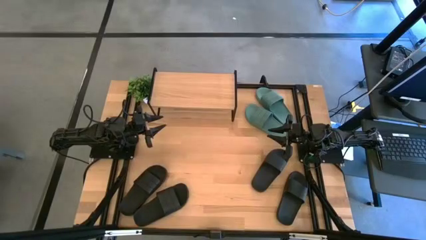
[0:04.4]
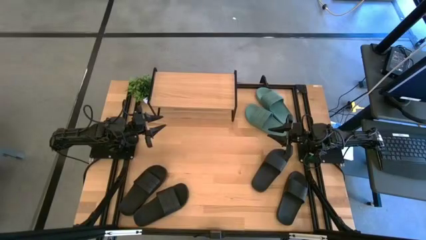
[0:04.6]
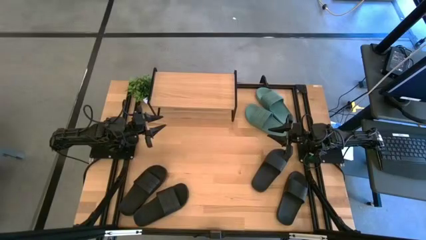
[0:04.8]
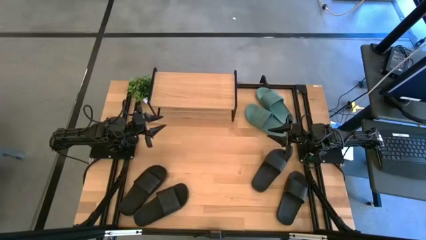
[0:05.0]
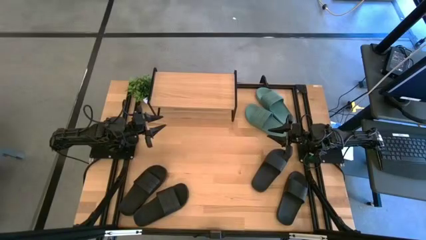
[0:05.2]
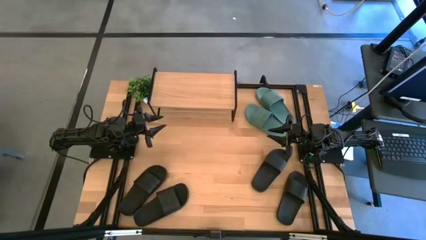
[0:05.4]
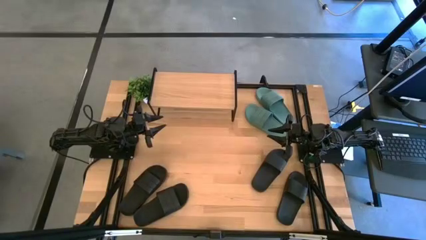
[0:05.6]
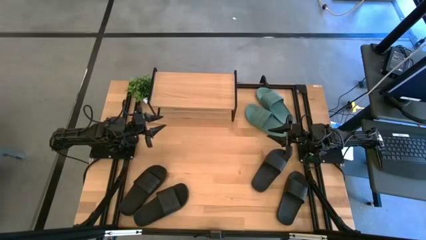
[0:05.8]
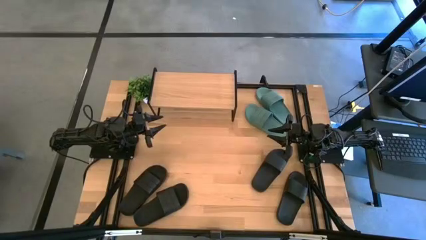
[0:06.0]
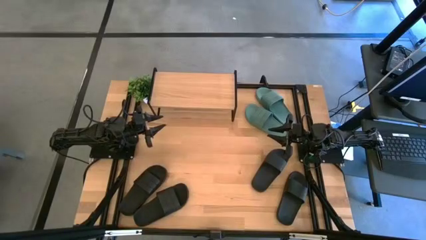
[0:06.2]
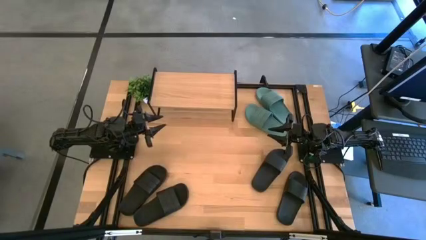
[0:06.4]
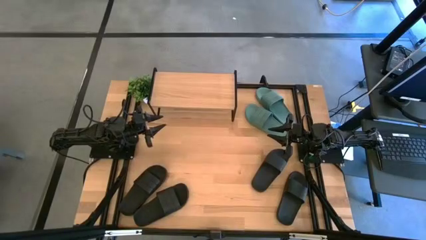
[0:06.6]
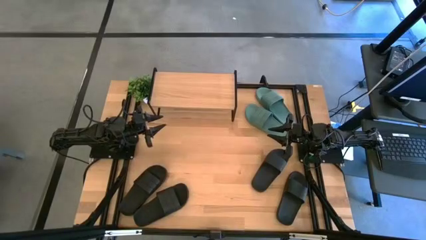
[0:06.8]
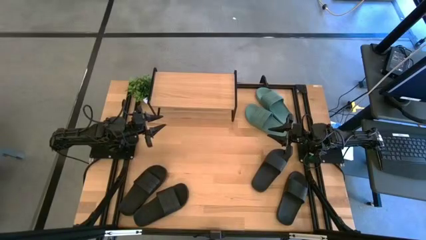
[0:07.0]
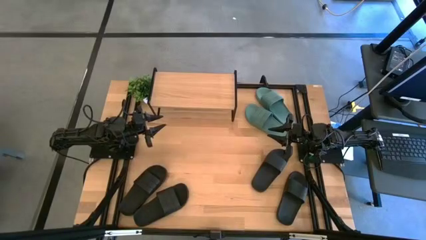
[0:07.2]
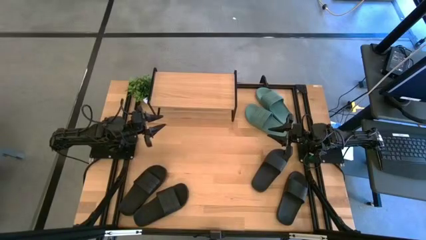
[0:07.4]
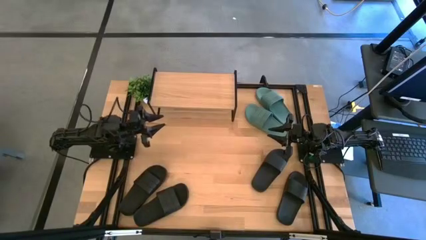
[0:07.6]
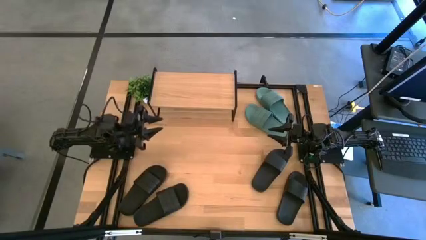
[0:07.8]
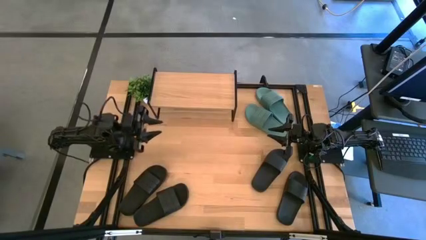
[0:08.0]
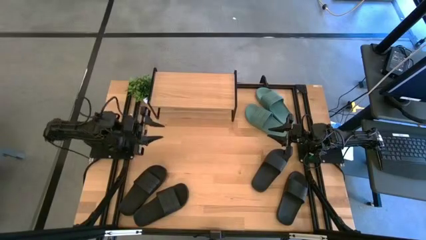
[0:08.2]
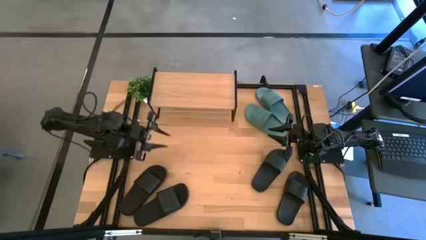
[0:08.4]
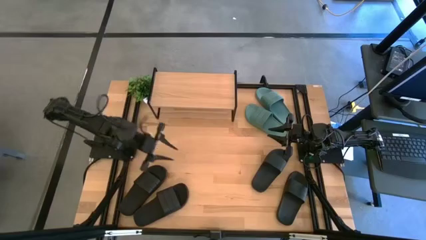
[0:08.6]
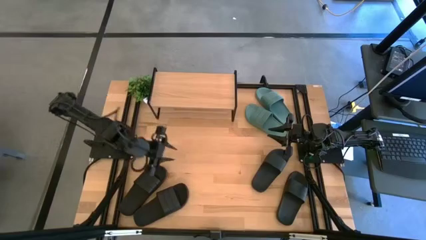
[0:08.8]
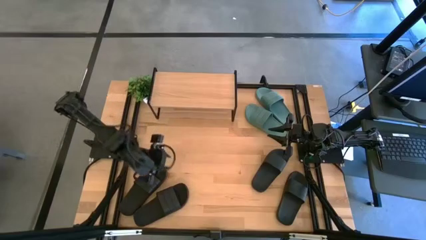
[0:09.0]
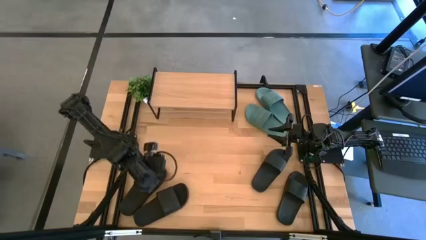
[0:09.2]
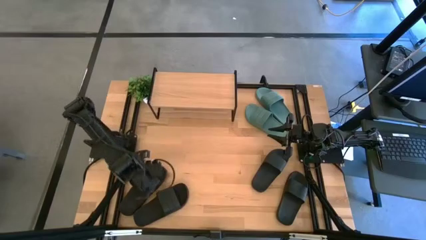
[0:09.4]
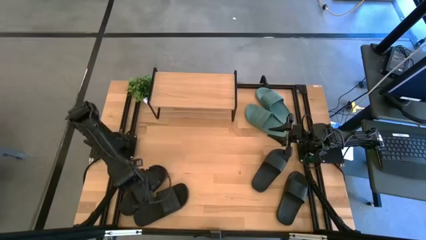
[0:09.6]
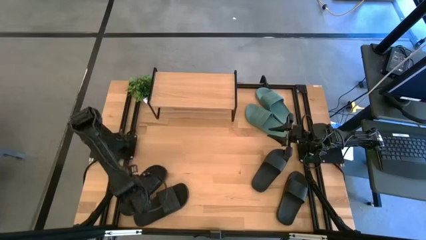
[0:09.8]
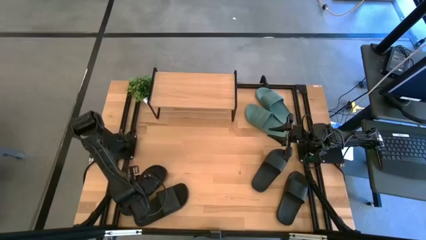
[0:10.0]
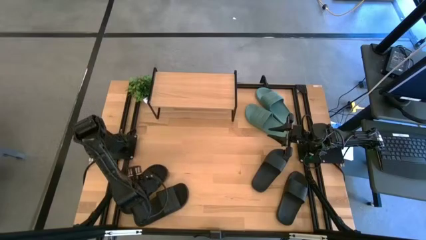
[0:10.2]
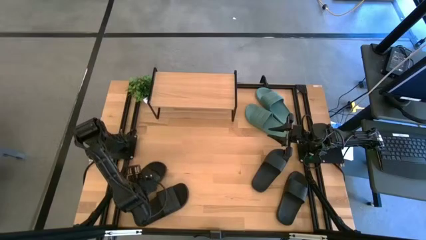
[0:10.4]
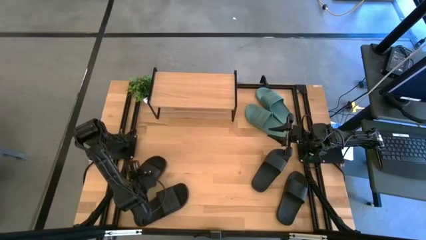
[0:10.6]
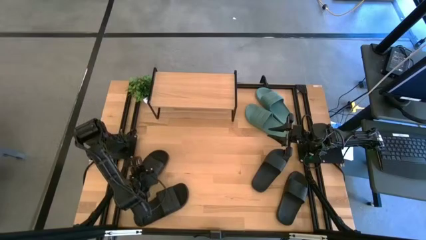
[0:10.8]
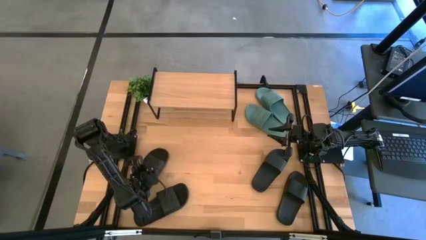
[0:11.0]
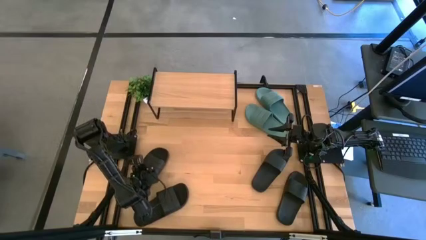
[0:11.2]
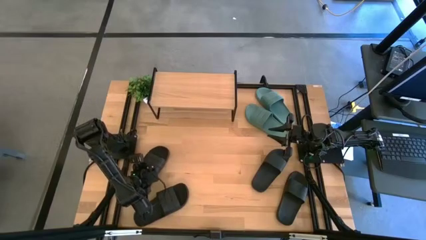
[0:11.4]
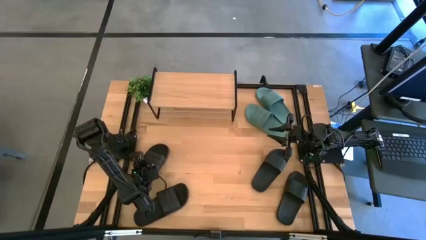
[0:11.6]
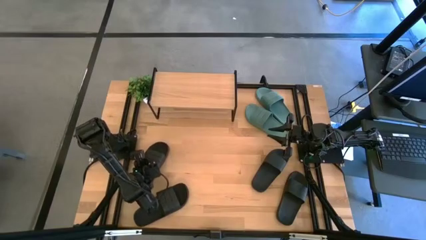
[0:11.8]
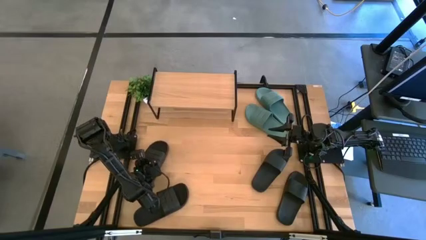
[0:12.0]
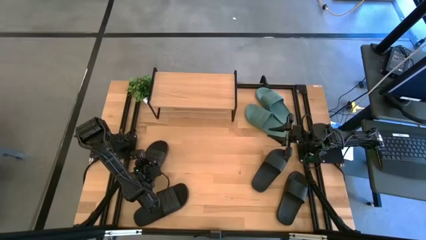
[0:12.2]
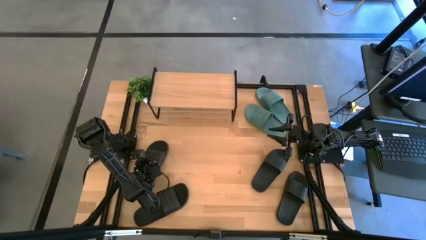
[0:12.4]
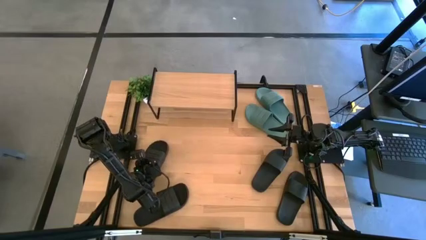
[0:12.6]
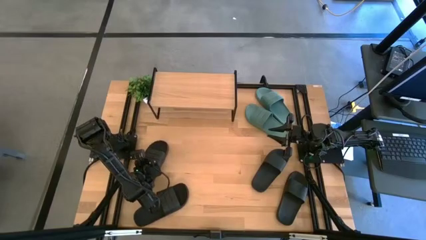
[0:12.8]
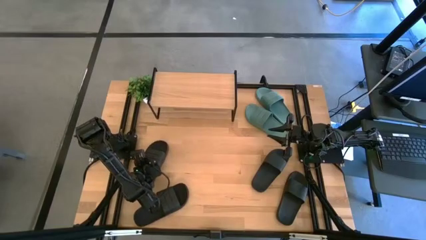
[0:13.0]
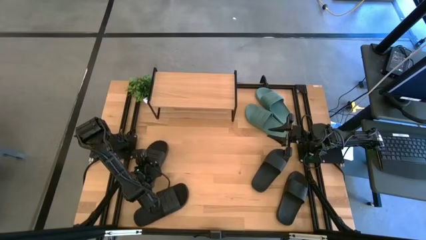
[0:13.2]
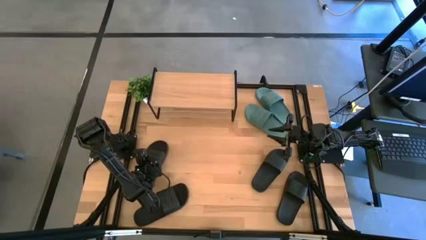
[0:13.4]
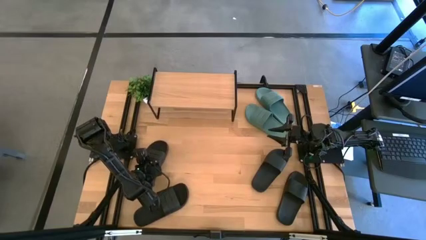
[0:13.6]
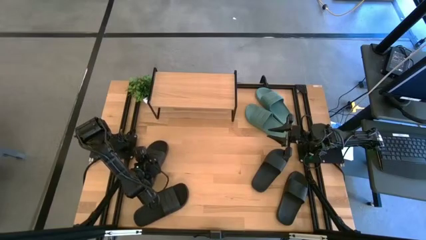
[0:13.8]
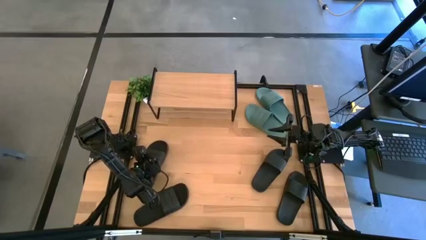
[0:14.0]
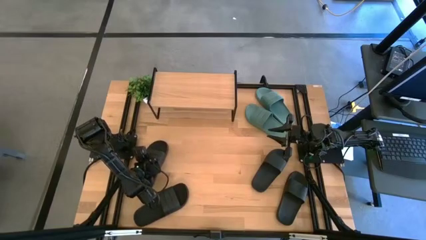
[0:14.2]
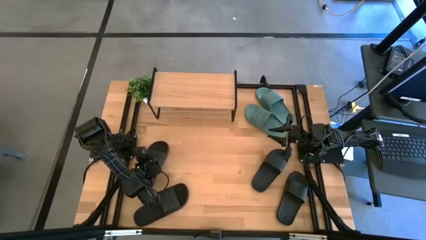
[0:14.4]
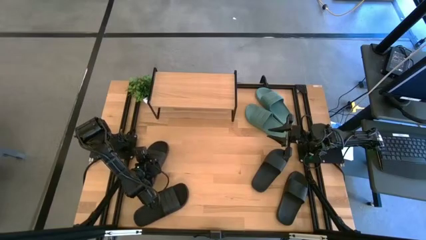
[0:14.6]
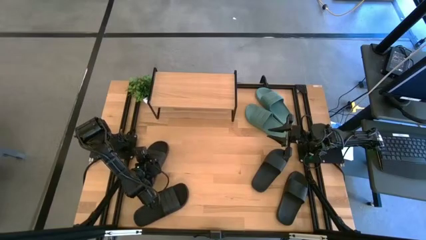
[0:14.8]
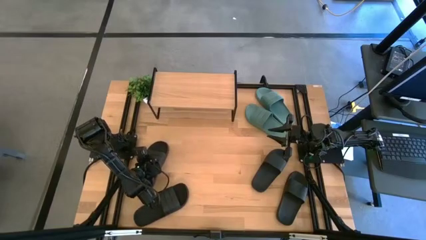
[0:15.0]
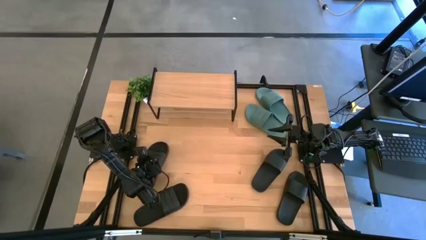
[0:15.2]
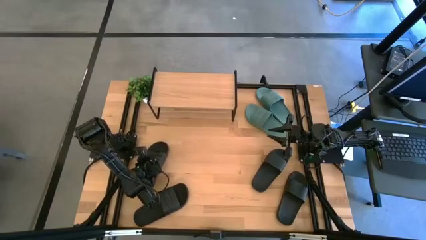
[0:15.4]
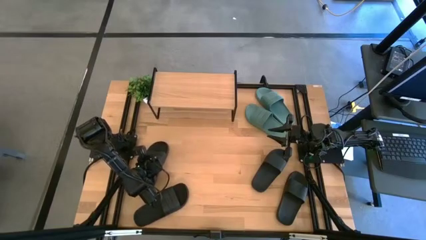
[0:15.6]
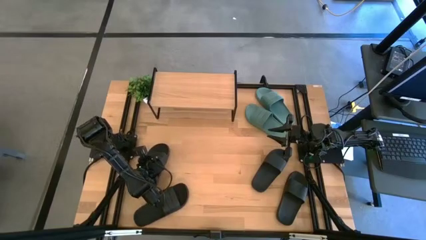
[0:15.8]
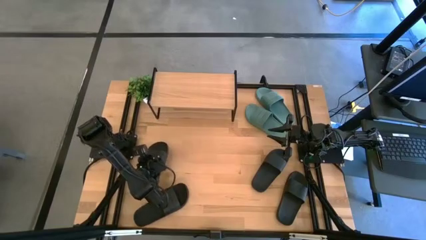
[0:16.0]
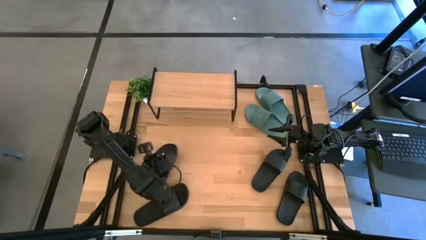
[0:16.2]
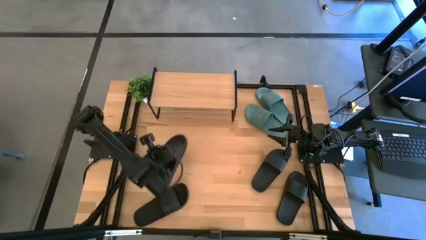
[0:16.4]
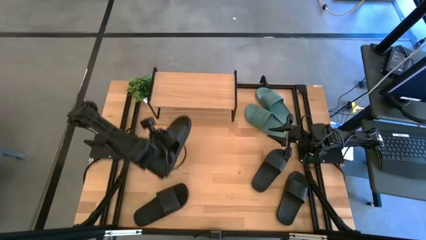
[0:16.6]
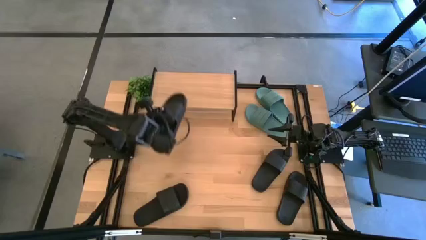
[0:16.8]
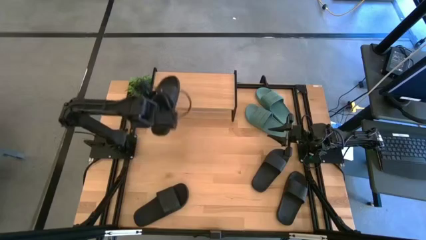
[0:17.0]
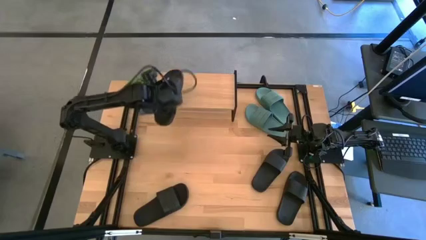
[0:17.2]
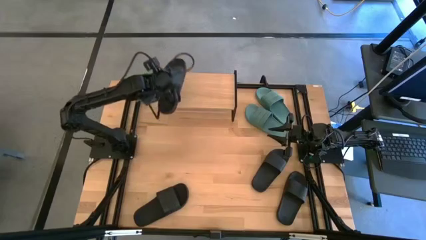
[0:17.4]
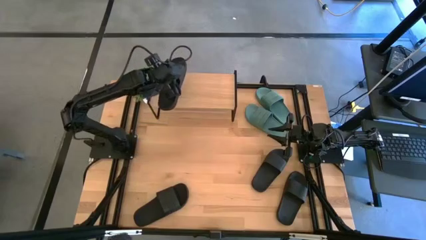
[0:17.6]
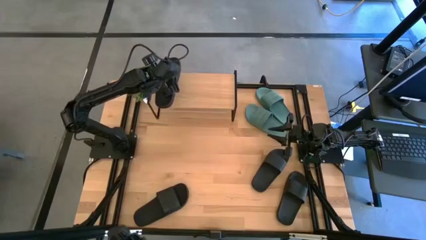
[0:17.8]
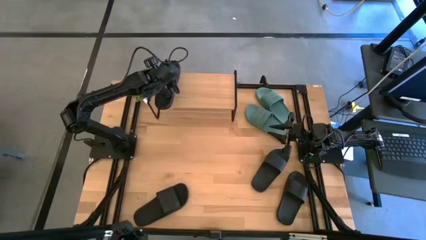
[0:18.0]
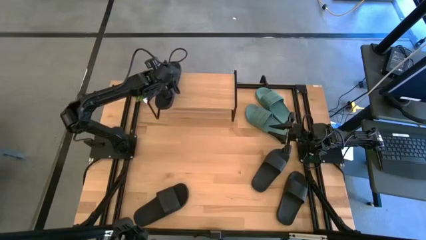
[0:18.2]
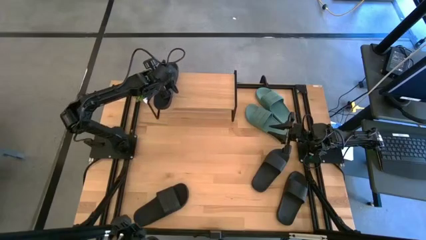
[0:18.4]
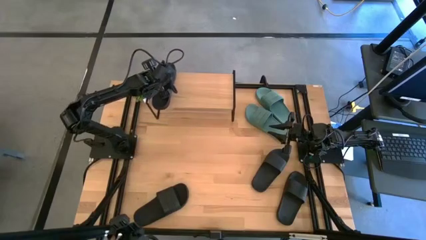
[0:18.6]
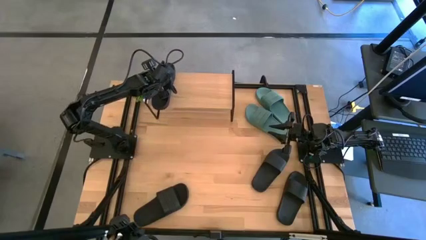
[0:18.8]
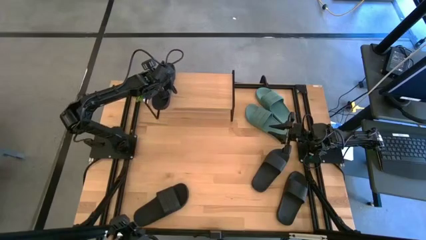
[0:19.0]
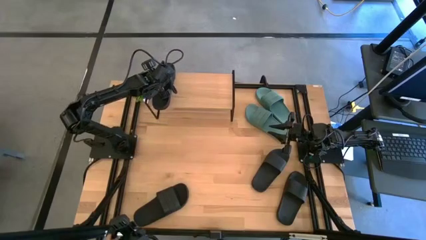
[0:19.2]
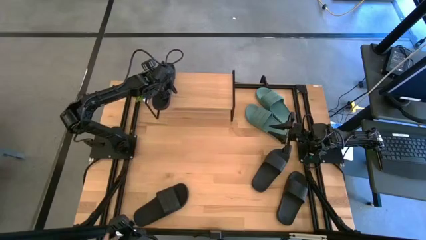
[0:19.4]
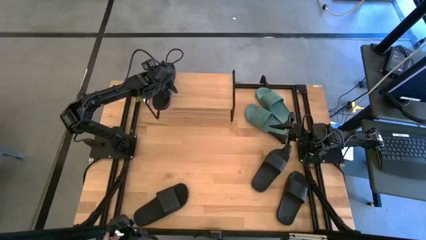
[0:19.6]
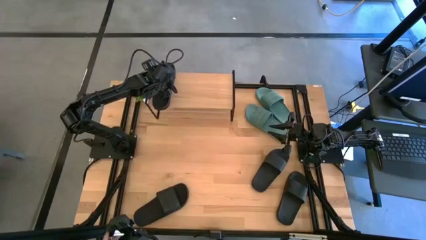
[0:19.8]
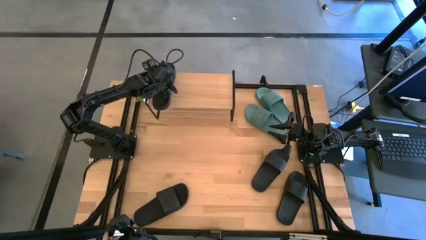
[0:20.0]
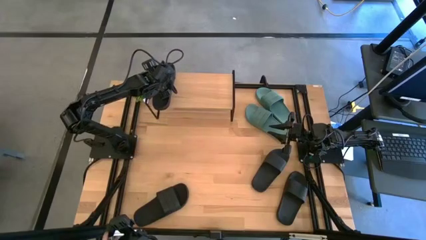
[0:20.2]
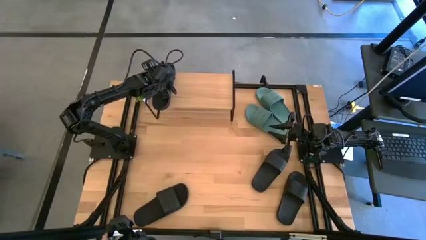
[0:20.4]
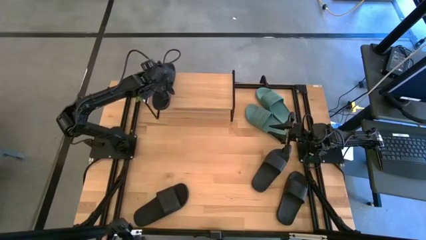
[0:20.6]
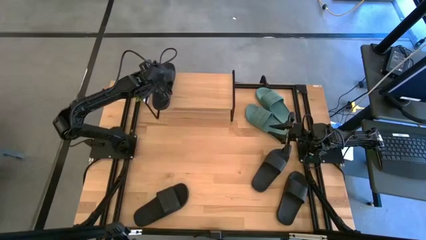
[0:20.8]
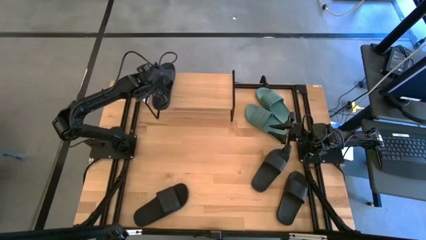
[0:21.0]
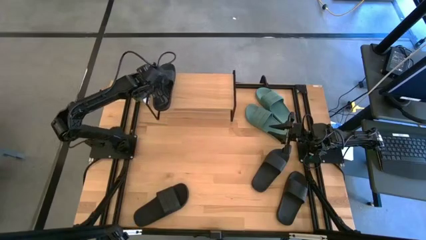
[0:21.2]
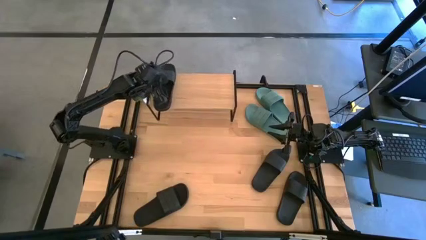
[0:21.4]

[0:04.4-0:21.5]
Task: Pick and place slides into the shelf
Put the black slipper on the shelf
